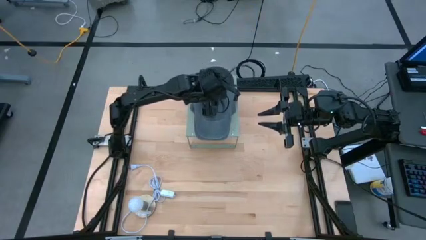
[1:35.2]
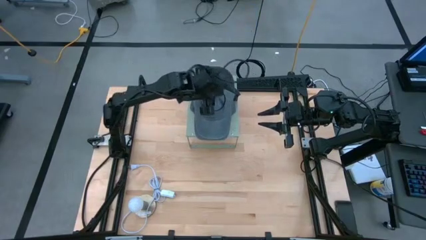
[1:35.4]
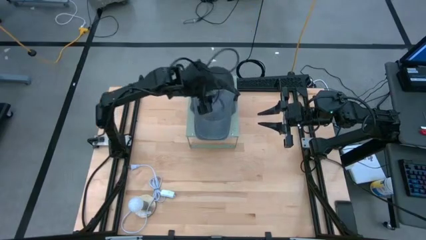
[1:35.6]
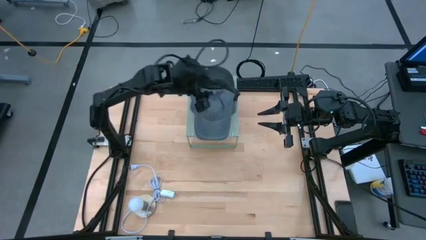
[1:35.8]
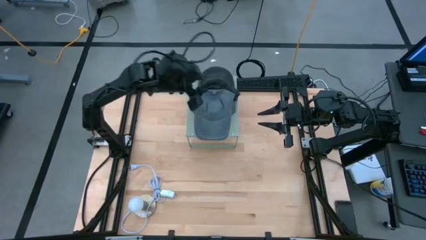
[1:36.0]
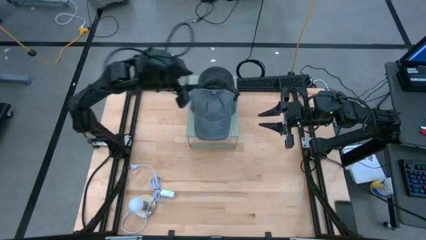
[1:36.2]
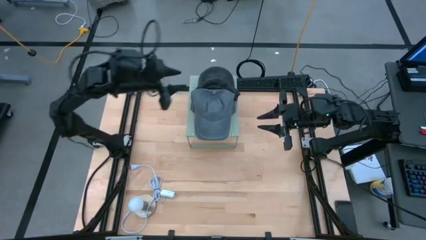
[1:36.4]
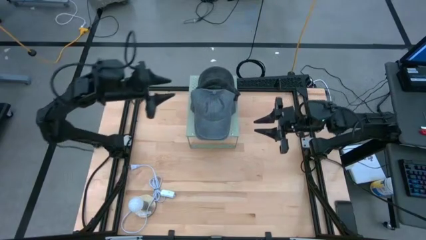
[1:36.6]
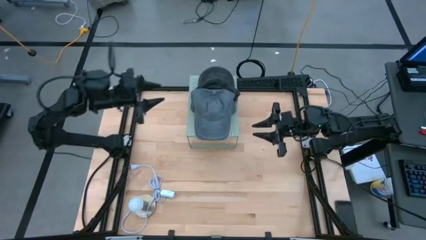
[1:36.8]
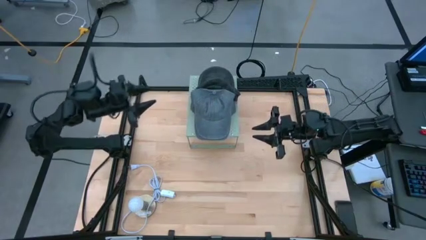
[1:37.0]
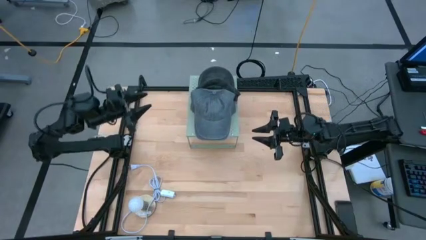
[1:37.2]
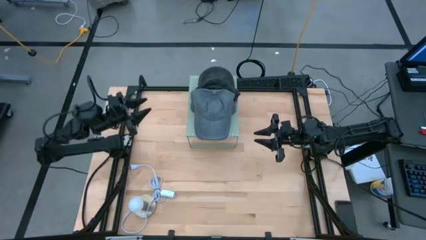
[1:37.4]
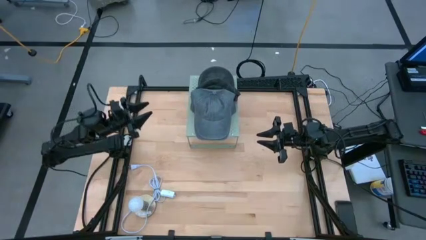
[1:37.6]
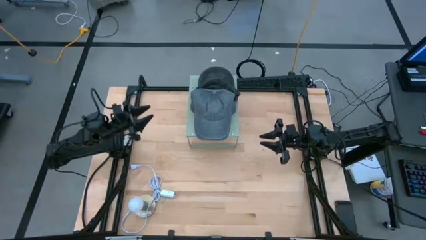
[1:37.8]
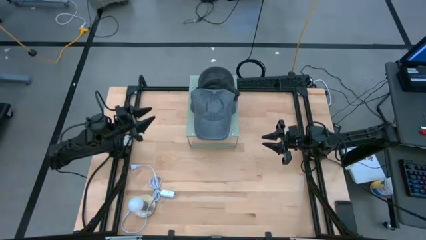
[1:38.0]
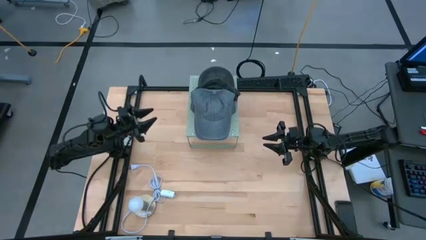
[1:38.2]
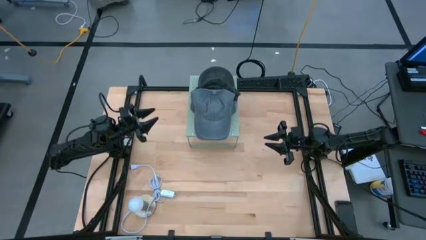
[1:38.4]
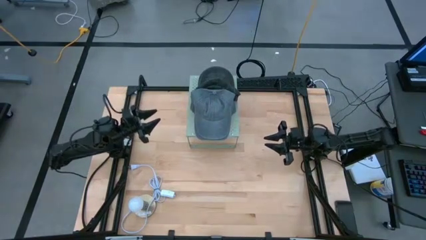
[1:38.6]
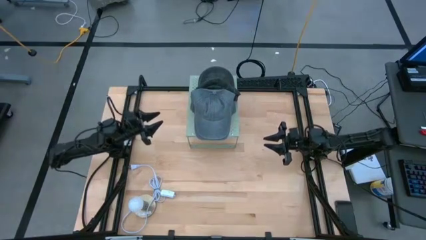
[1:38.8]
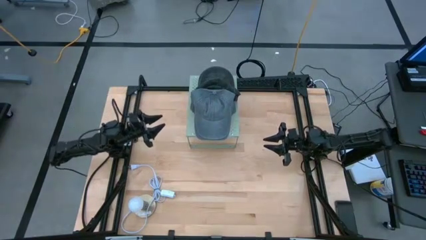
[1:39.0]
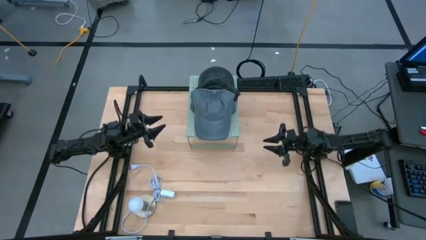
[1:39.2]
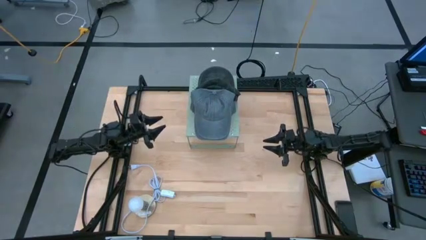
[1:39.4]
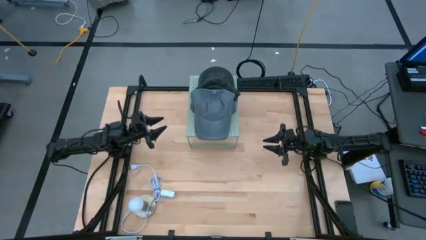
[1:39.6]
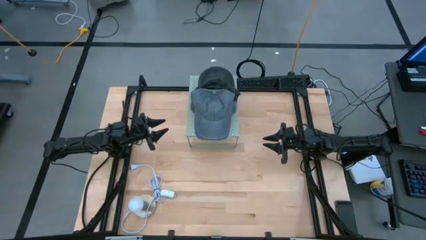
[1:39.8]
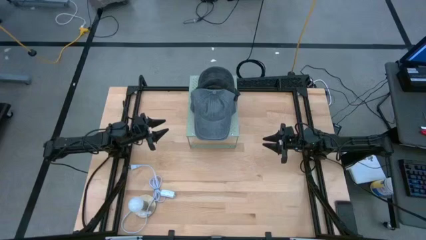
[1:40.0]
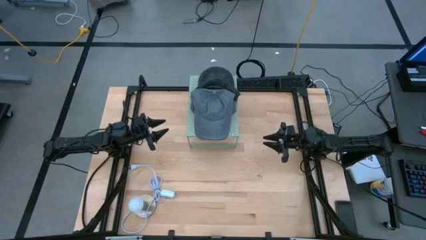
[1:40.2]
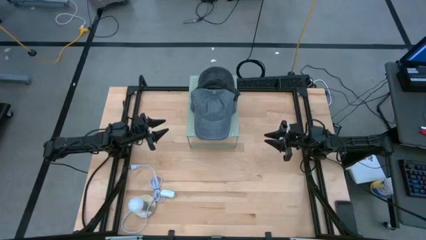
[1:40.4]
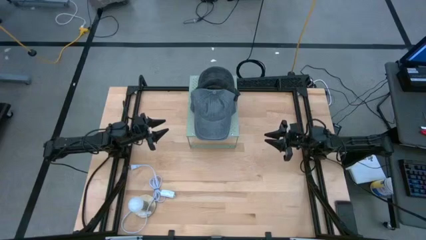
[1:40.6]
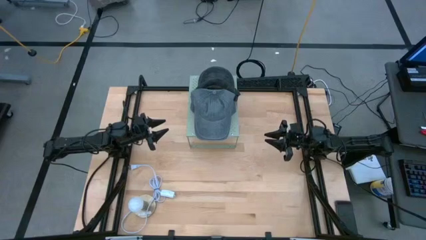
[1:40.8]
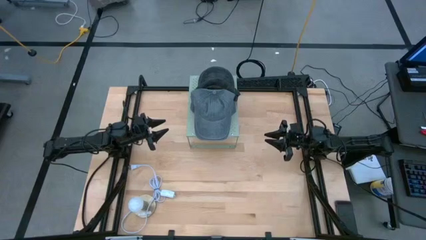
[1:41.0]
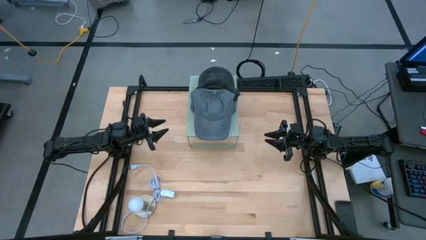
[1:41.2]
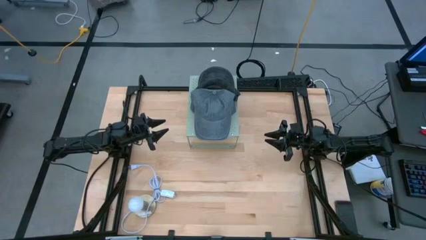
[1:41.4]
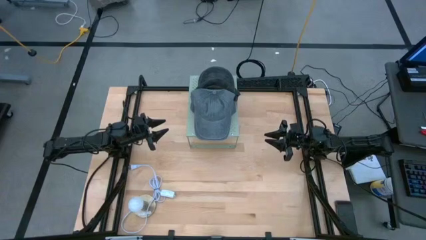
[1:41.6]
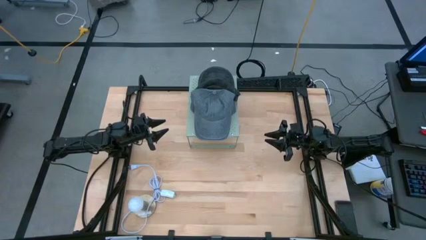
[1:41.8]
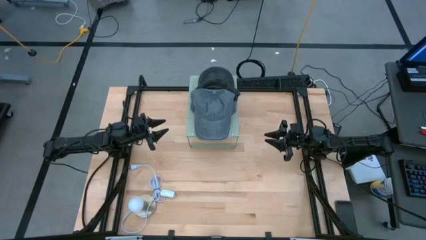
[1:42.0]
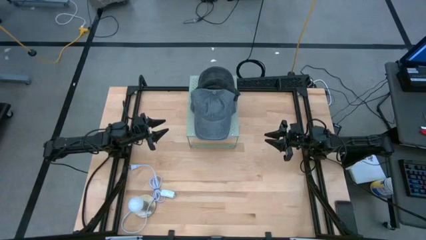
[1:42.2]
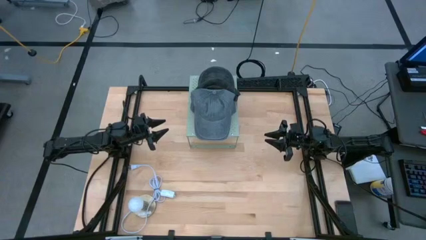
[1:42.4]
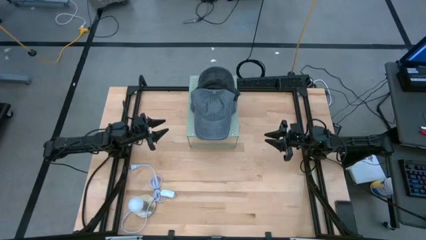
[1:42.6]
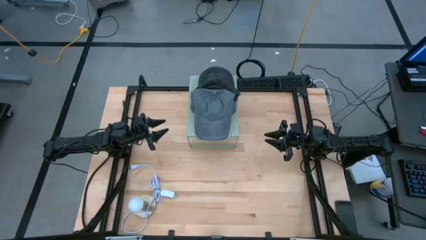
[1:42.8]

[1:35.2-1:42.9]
Task: Pick & Place hat
Return to Home Position

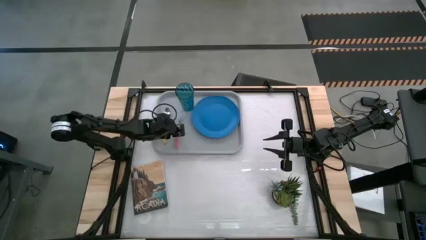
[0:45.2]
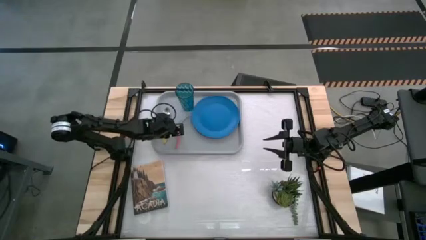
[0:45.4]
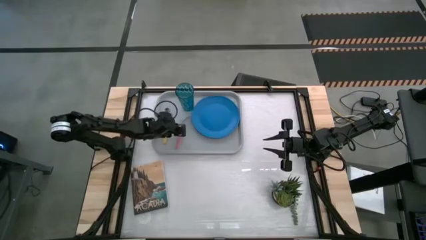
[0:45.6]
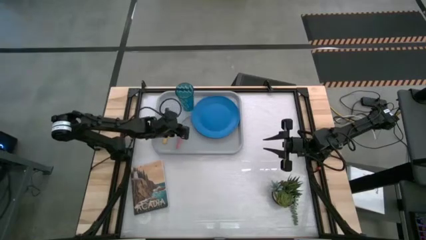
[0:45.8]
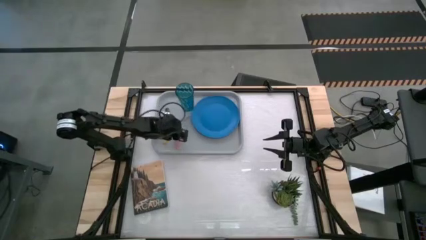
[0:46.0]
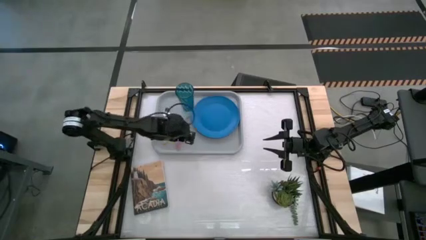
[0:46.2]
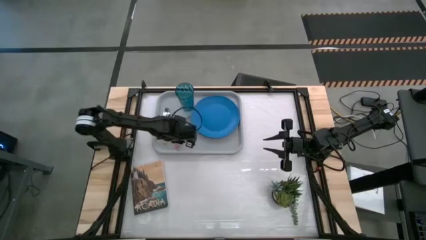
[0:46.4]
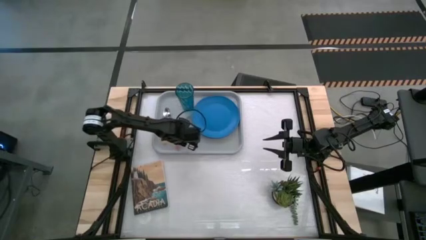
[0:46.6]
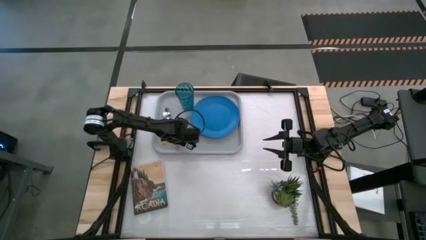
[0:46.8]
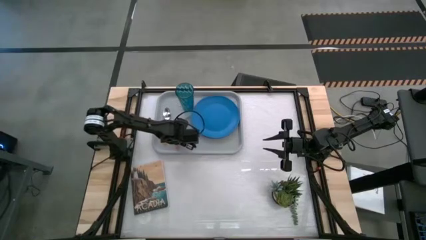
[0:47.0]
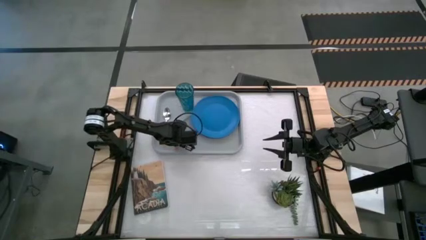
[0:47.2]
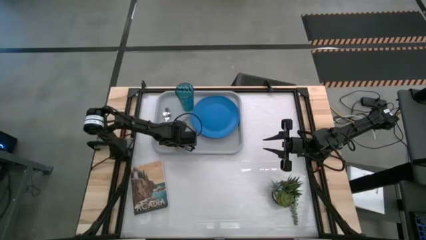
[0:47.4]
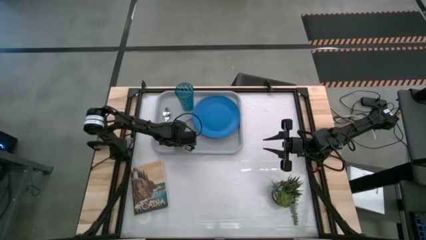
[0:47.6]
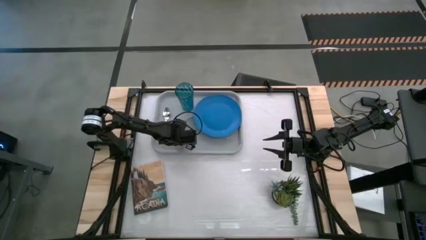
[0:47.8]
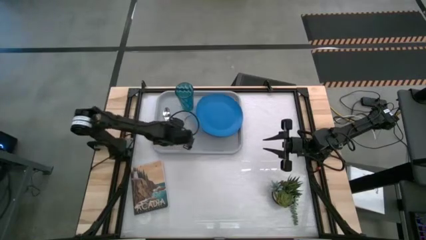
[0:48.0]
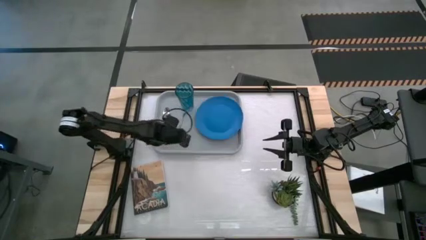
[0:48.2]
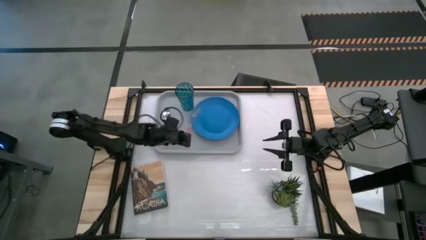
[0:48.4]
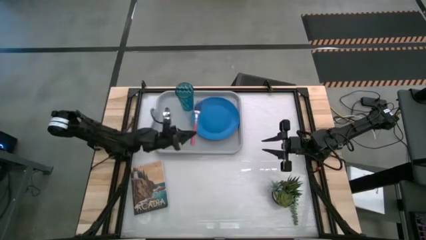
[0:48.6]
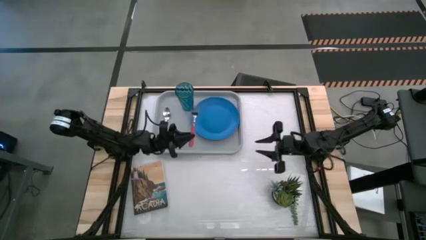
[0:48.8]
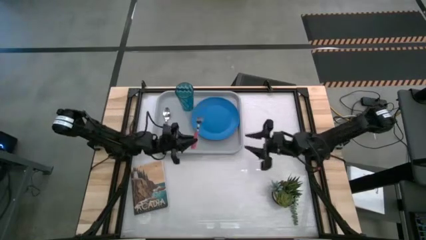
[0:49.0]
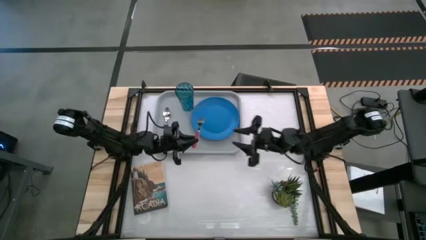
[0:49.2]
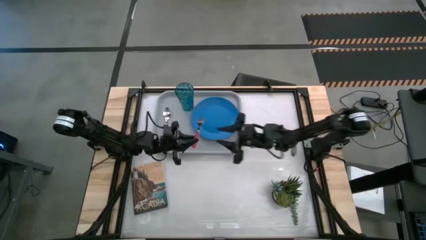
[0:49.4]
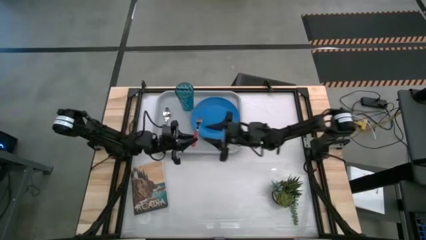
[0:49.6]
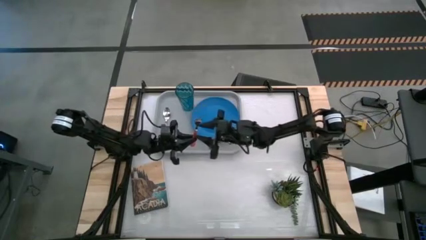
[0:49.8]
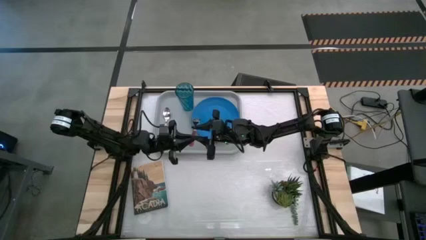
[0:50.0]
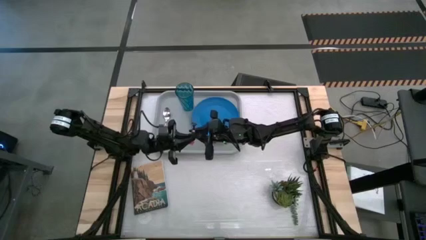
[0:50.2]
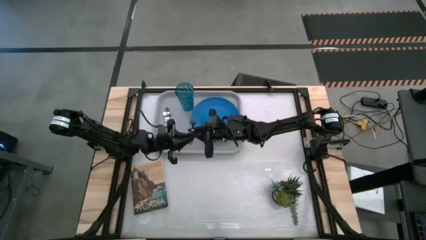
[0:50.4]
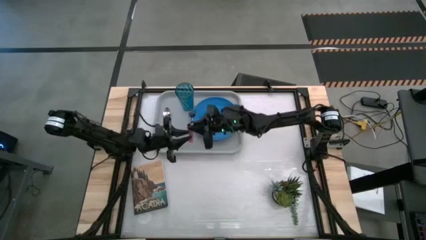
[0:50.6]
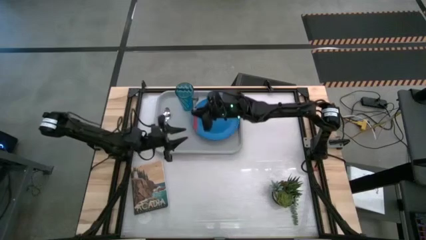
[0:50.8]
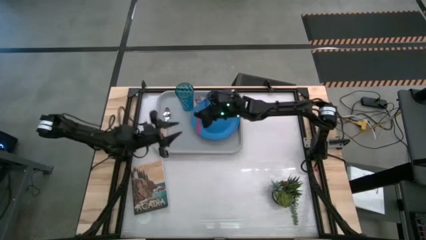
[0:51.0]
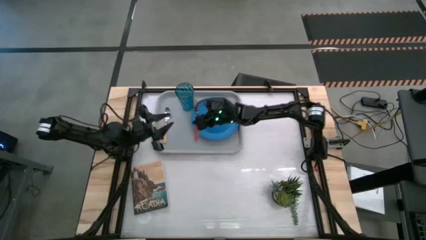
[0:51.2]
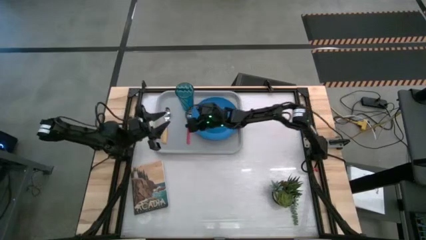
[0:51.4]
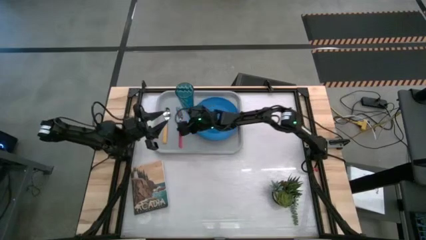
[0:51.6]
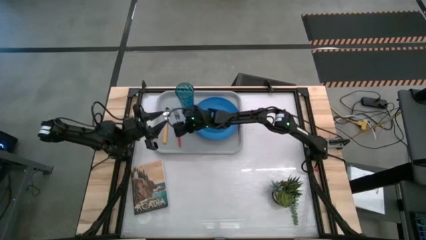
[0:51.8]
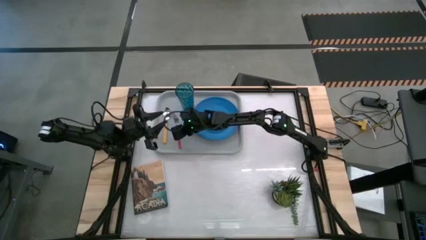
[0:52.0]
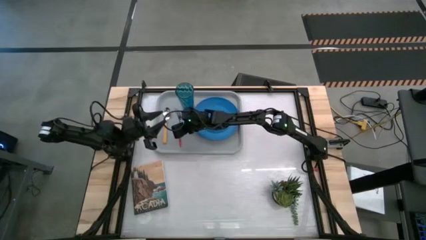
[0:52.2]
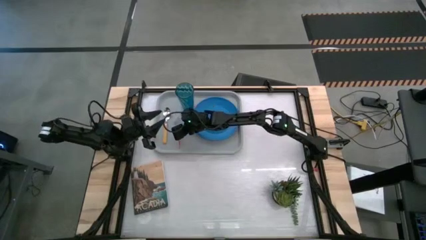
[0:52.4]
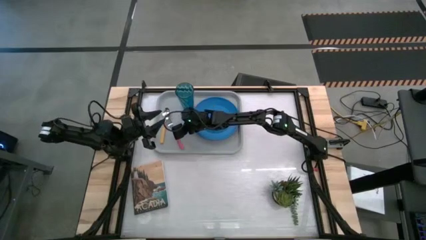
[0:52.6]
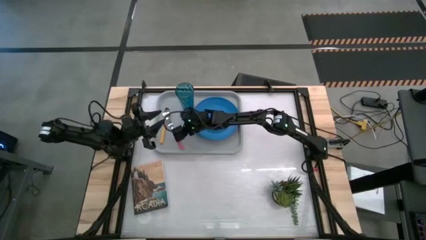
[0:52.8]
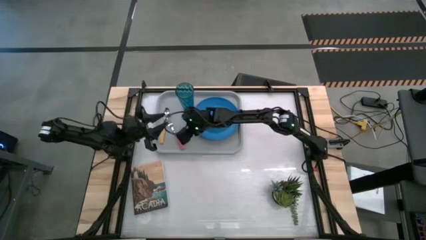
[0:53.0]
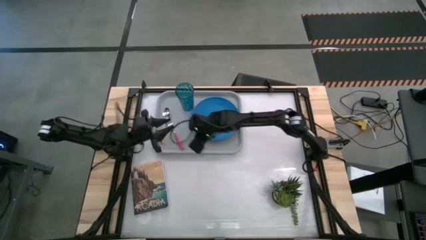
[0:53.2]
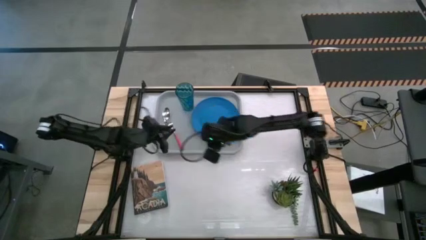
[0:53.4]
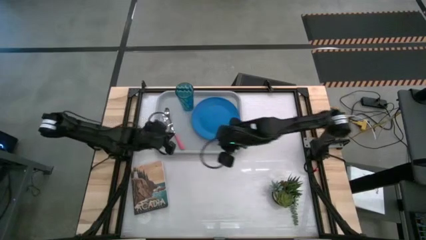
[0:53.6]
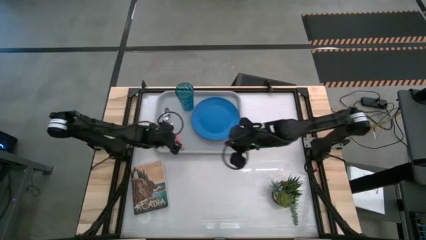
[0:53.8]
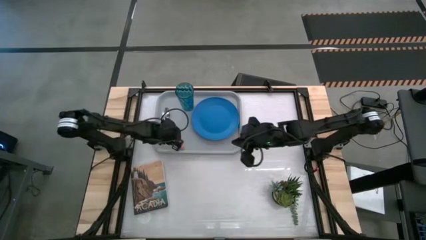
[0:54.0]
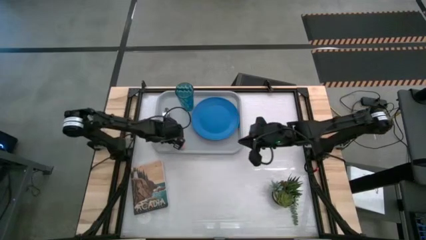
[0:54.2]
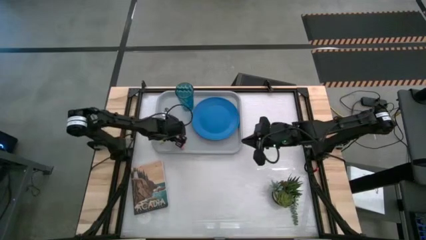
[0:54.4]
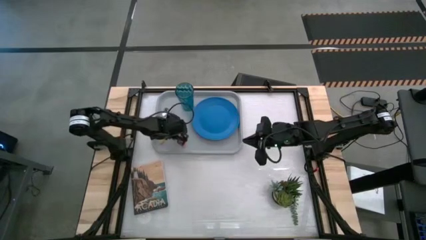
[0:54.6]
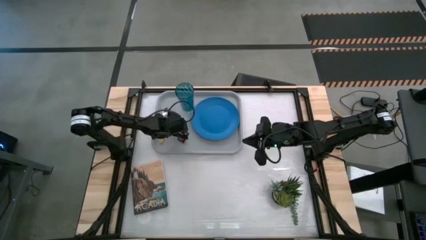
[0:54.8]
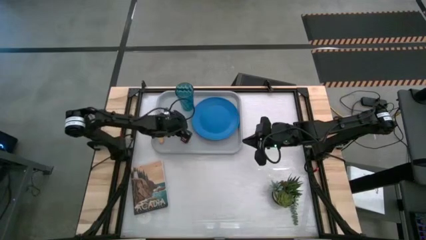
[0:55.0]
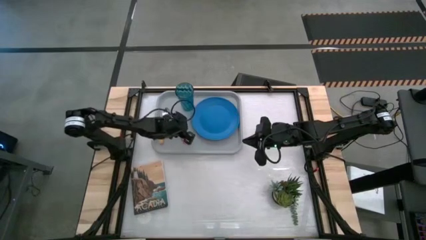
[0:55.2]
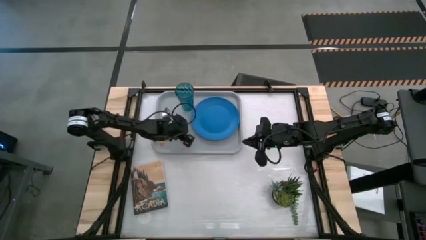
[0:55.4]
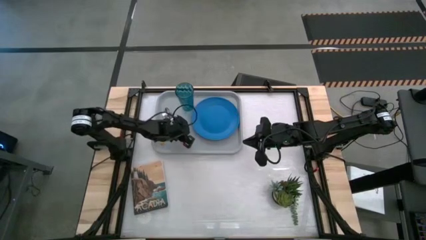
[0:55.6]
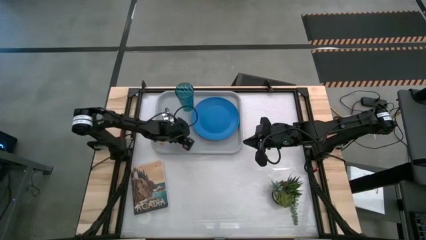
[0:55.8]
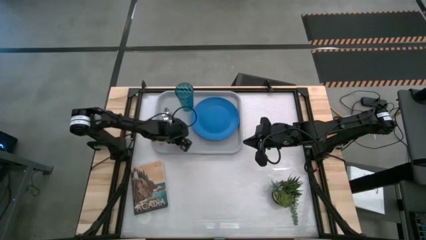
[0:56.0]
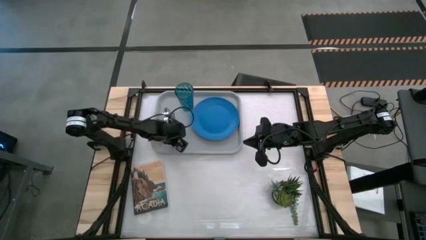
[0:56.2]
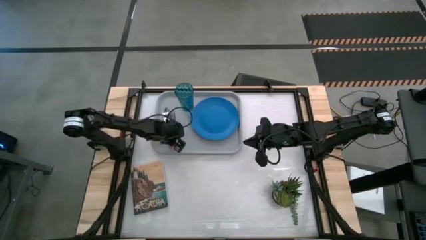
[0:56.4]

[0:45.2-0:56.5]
Task: Pick and place plate/cup/fork/spoon on tray
Put the pink fork on the gray serving tray to the right of the yellow spoon
